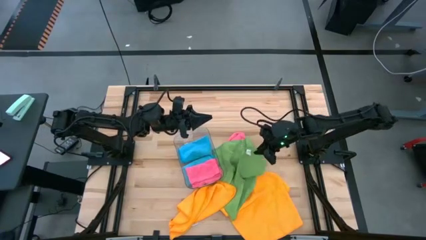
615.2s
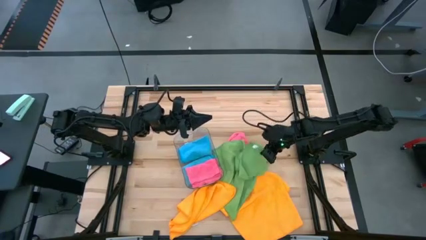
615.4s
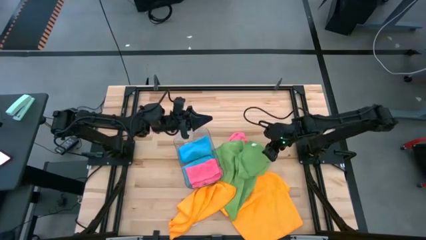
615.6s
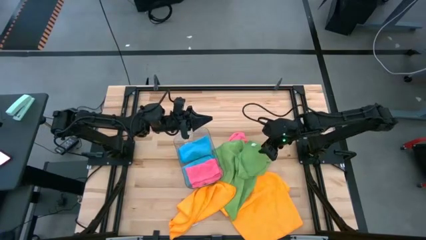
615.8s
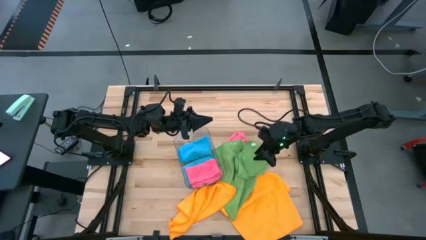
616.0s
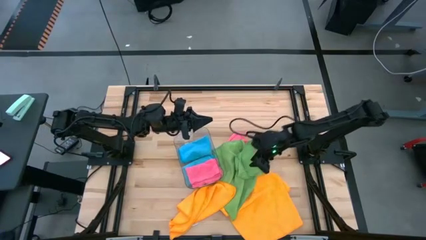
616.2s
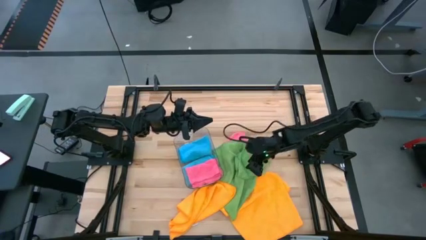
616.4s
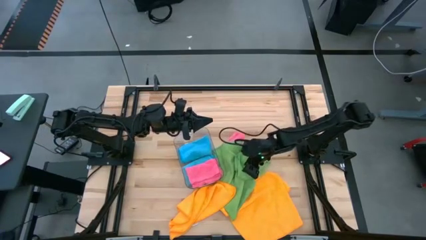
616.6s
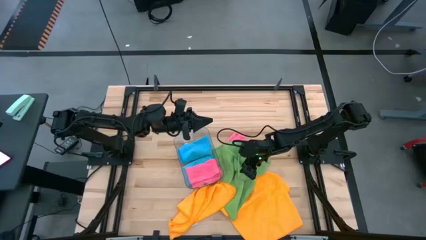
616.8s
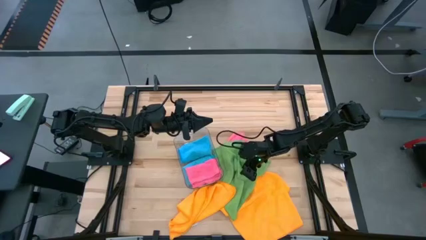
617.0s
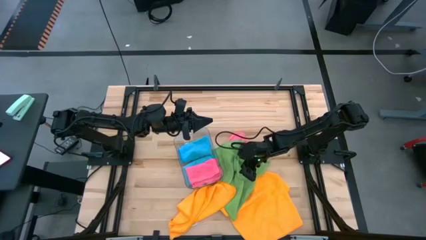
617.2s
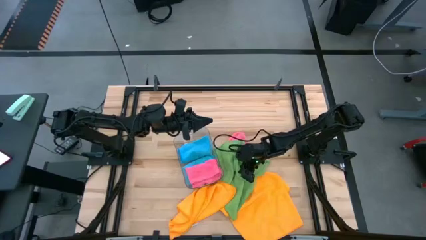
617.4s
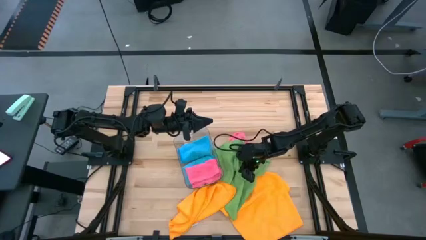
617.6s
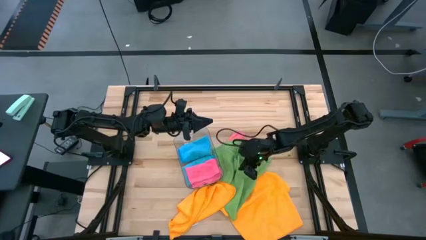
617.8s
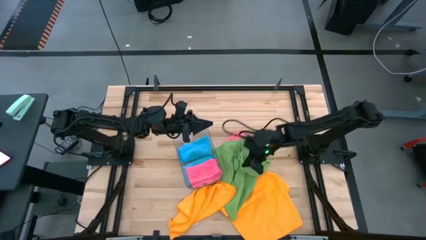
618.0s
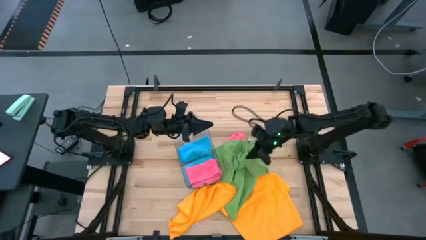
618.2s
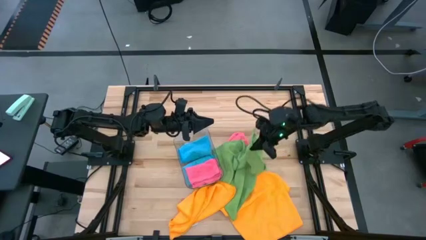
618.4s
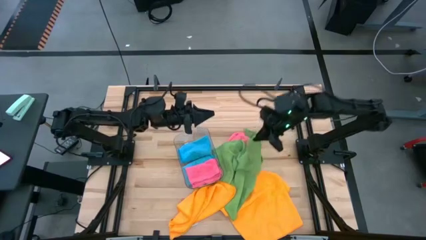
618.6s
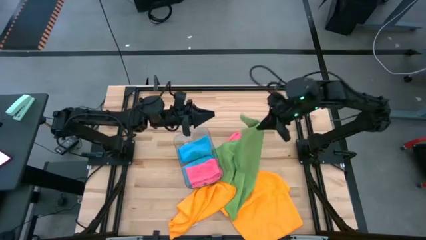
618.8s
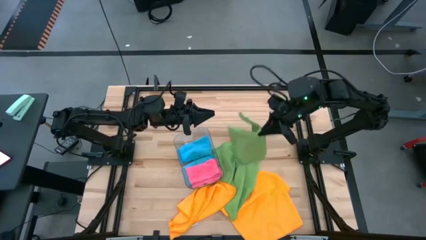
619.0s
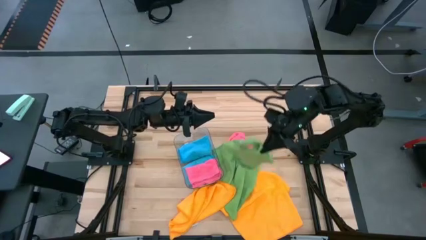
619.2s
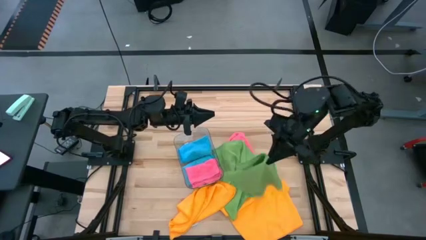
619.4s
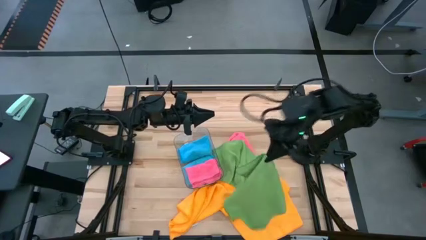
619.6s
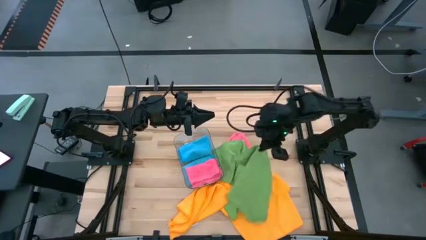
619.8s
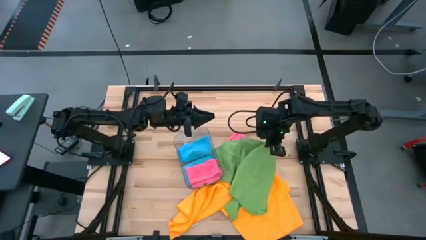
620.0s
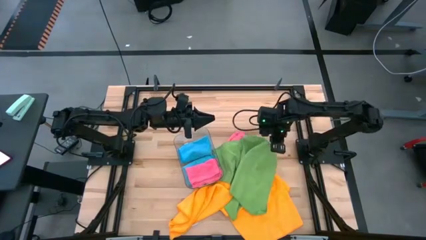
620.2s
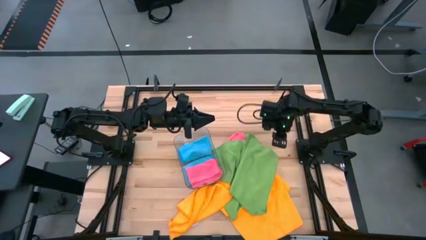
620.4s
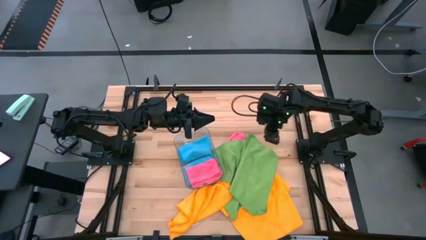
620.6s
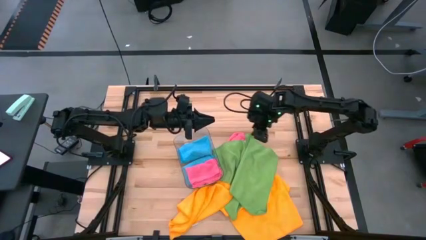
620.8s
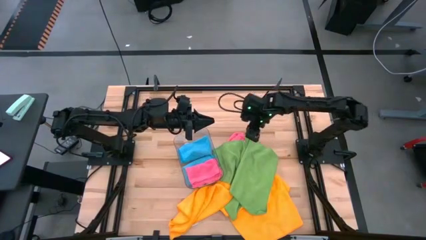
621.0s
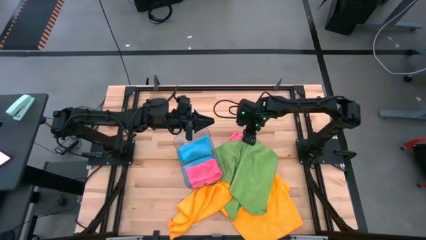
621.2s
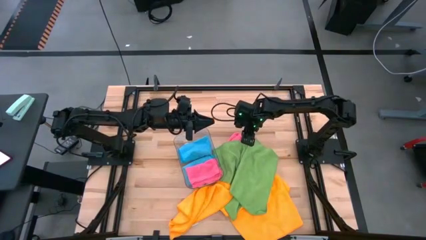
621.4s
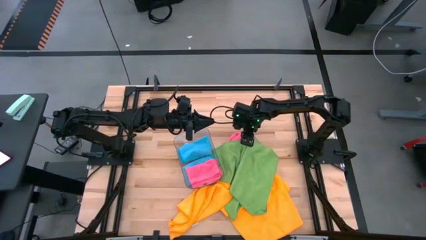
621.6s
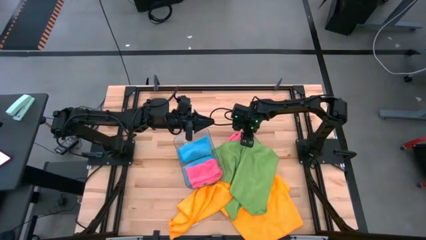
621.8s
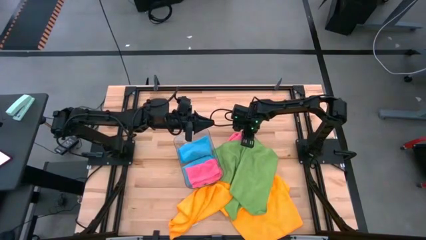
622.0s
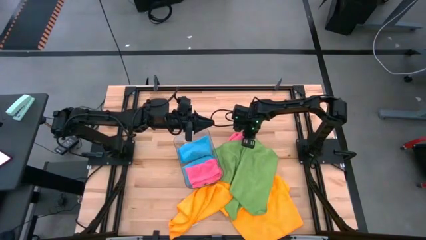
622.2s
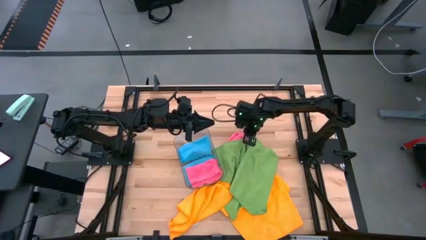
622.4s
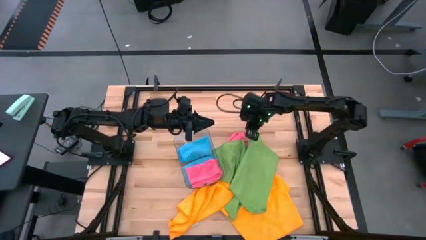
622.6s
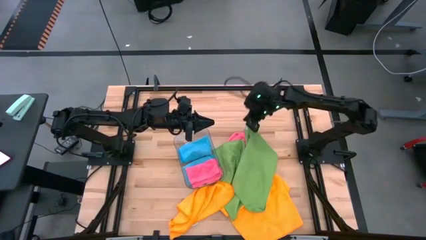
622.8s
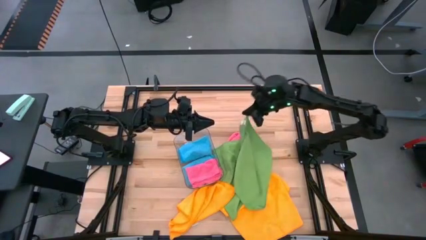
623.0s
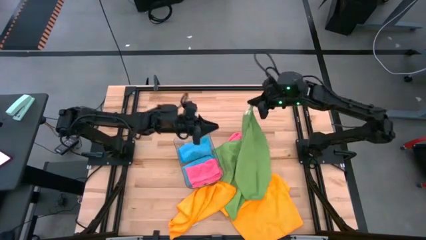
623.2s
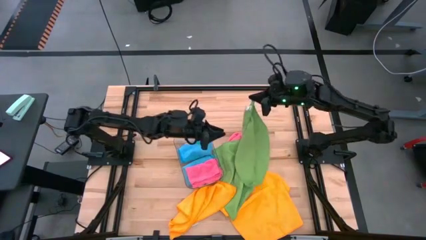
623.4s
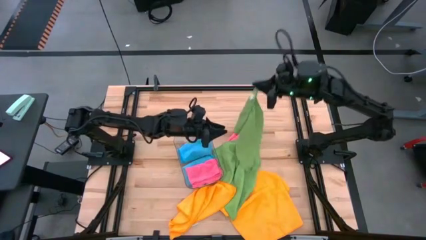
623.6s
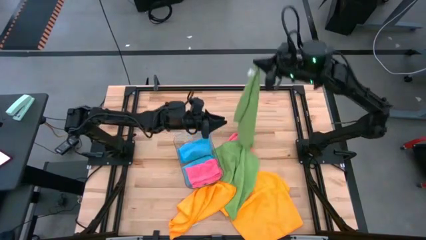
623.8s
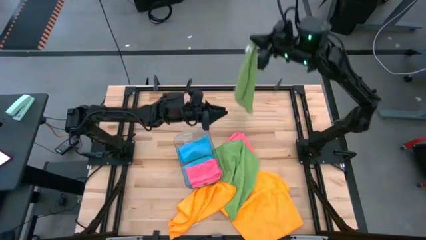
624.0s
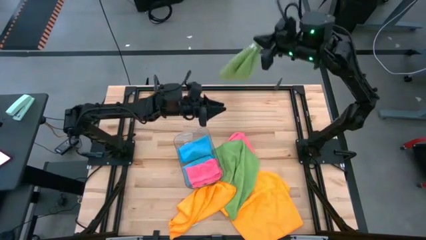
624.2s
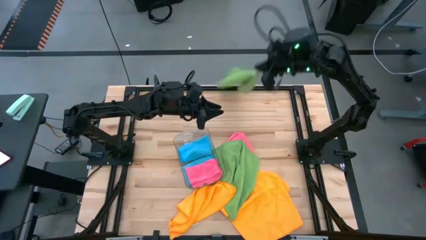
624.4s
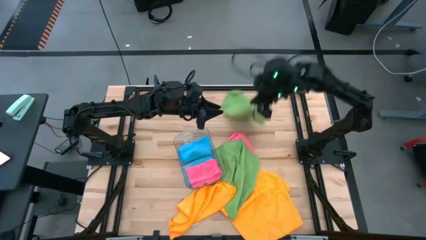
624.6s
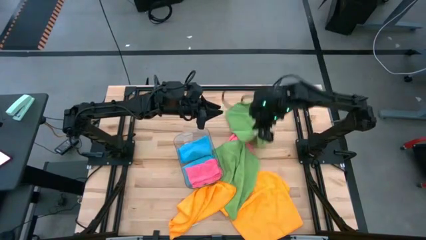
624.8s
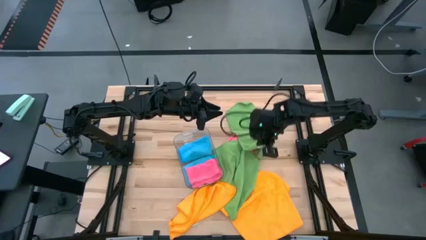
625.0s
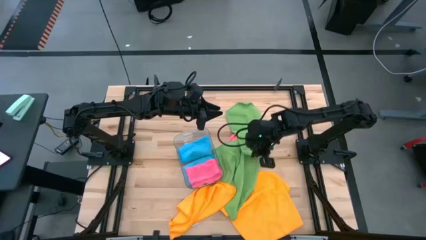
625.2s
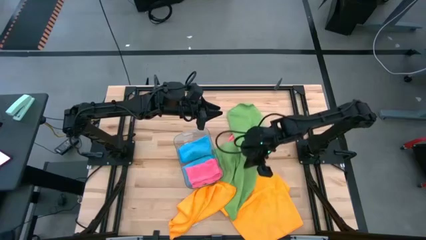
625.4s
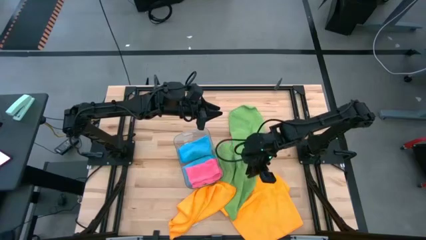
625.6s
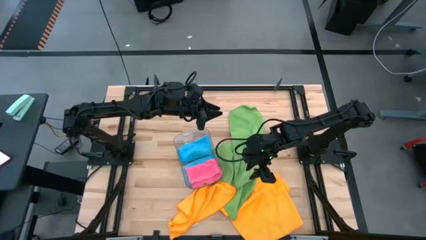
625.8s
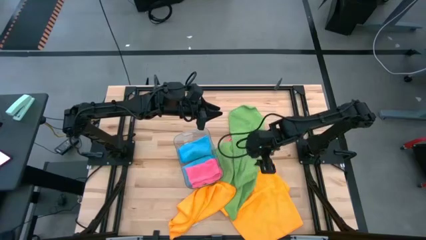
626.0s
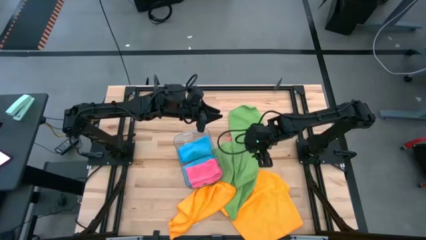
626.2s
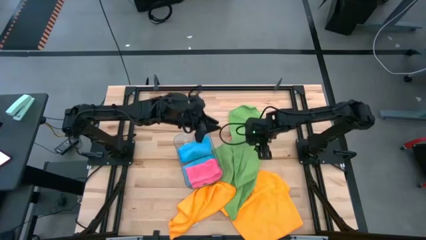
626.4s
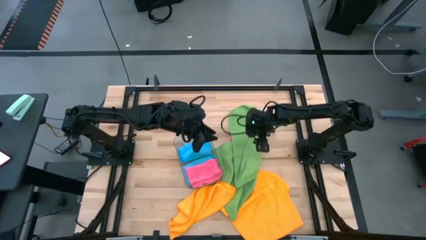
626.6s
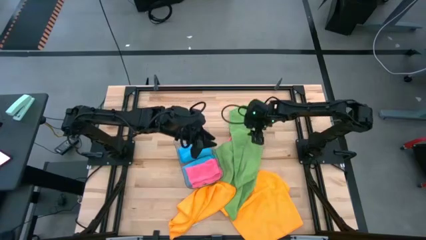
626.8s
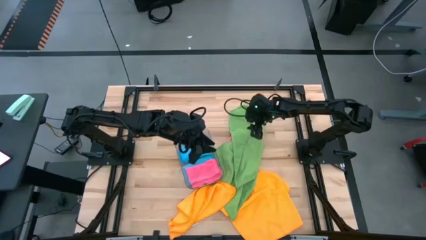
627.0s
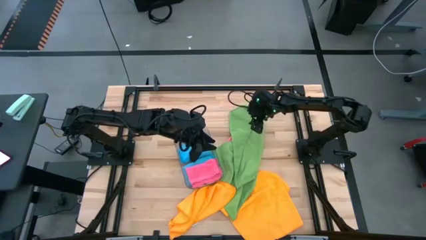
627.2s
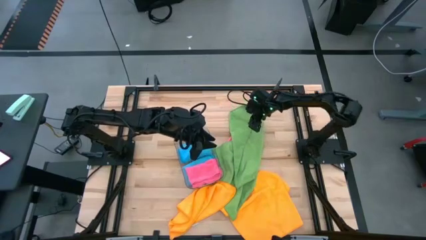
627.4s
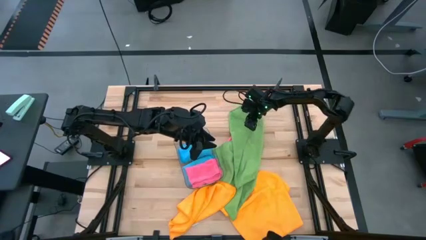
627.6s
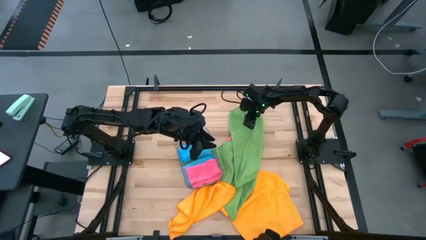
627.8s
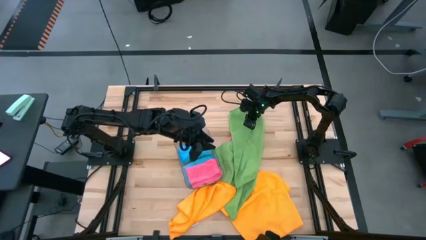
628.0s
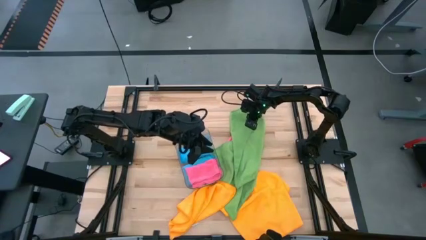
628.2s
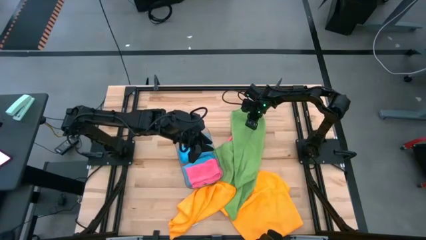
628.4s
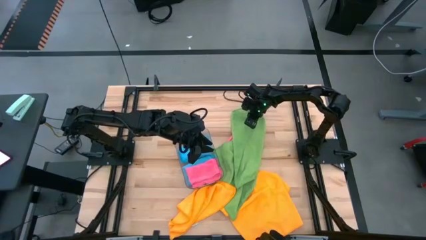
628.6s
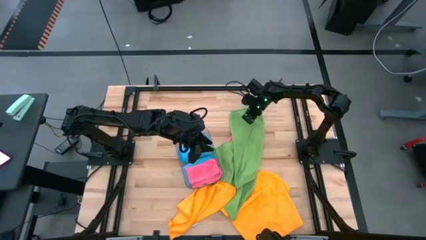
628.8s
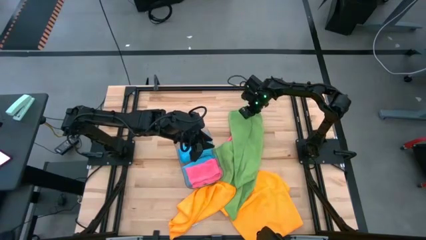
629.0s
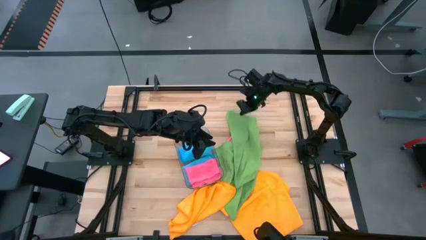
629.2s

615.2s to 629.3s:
Task: Fold microfiber towels
Fold the top green towel
